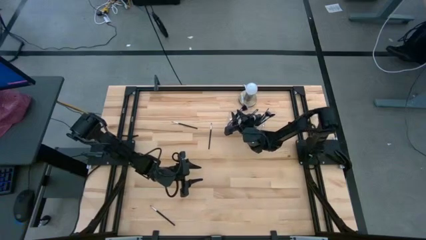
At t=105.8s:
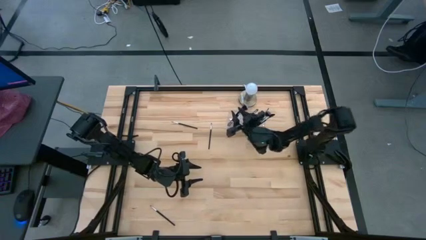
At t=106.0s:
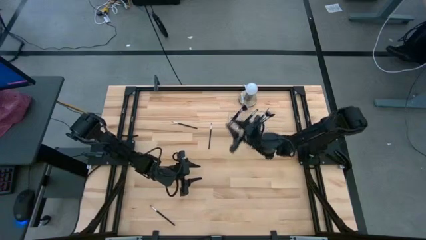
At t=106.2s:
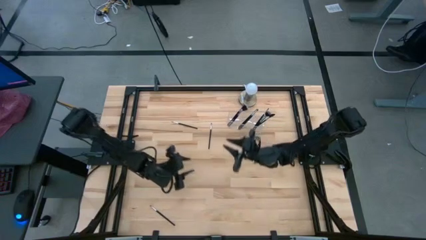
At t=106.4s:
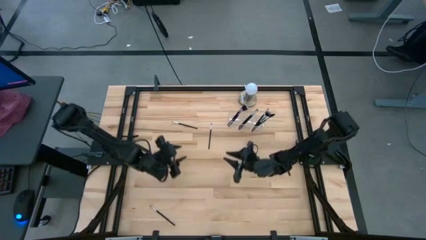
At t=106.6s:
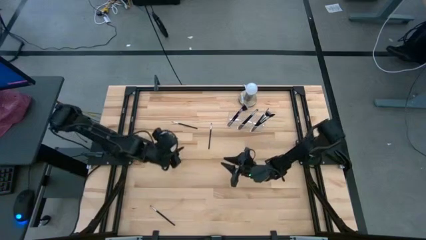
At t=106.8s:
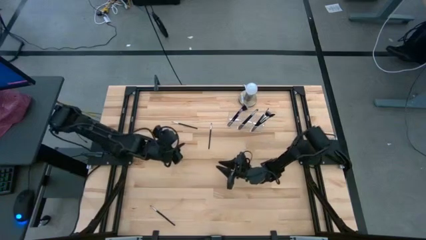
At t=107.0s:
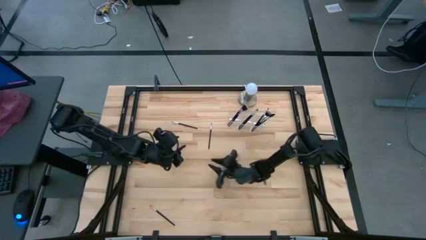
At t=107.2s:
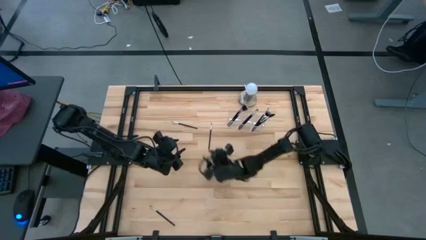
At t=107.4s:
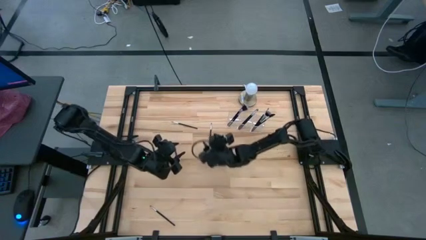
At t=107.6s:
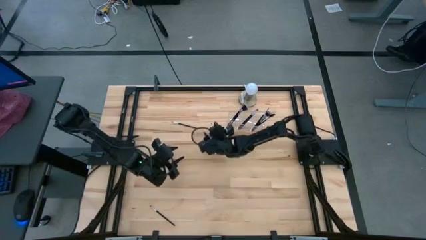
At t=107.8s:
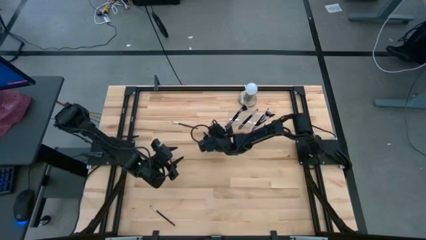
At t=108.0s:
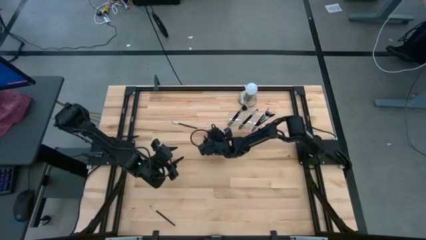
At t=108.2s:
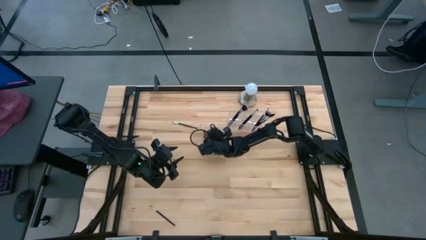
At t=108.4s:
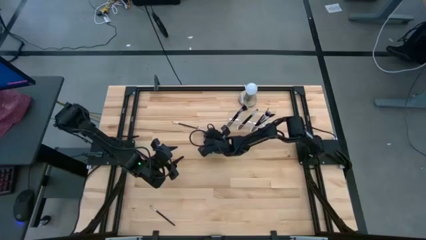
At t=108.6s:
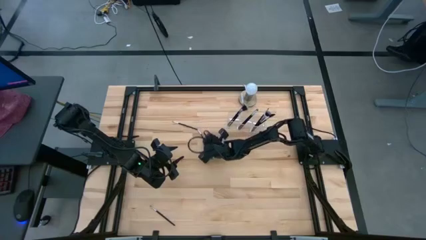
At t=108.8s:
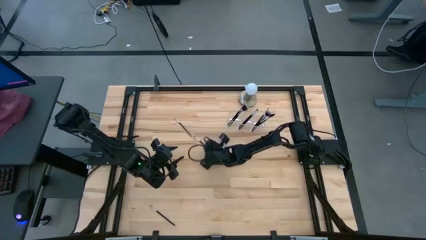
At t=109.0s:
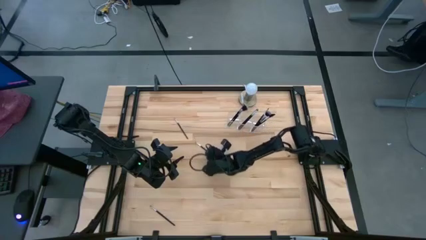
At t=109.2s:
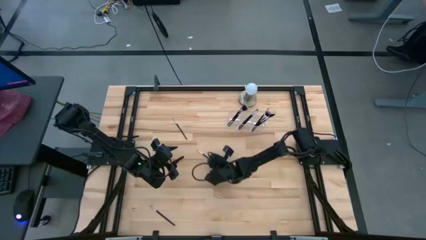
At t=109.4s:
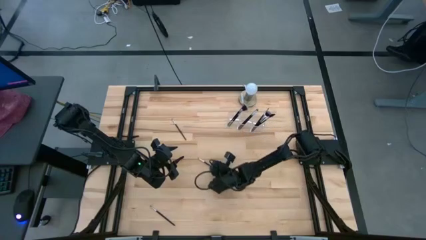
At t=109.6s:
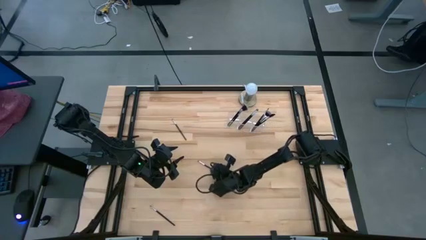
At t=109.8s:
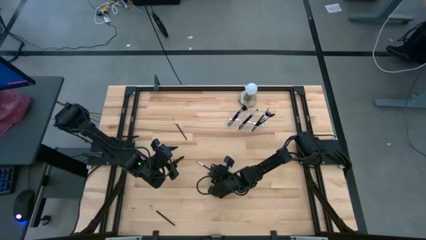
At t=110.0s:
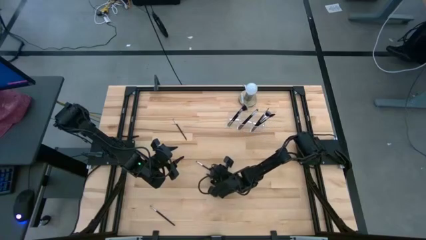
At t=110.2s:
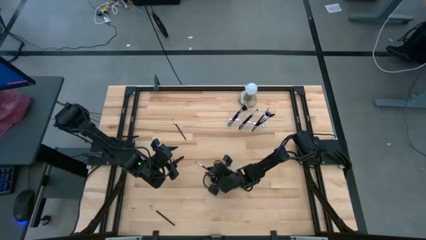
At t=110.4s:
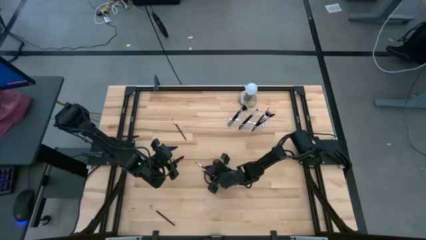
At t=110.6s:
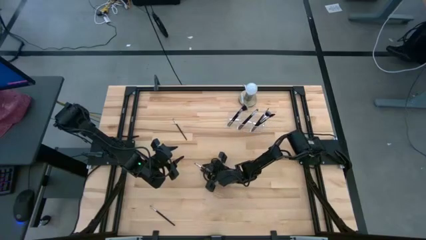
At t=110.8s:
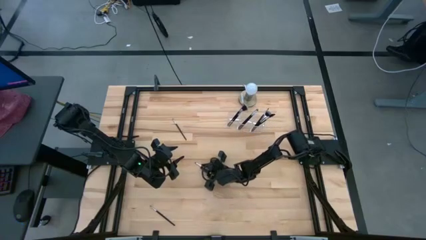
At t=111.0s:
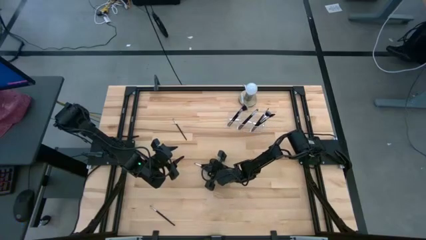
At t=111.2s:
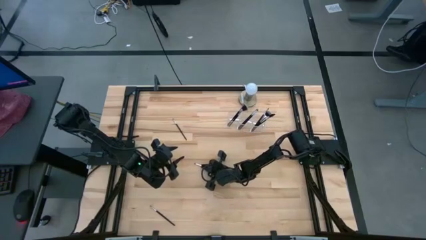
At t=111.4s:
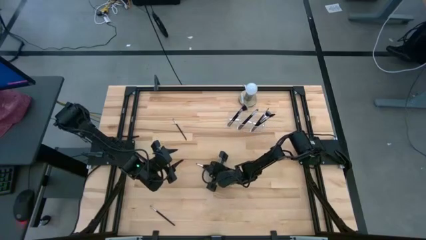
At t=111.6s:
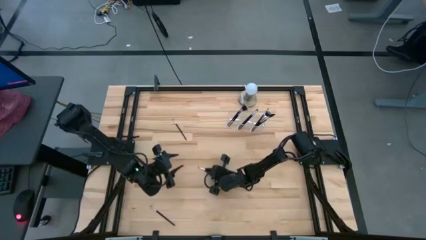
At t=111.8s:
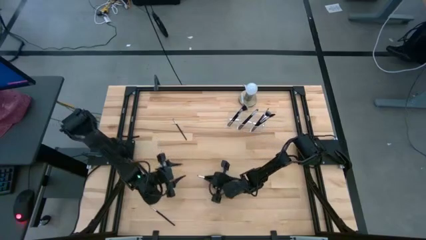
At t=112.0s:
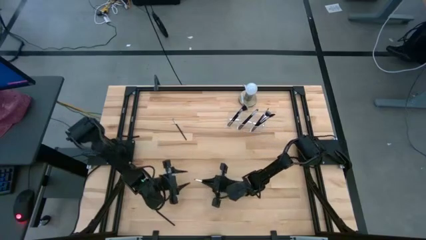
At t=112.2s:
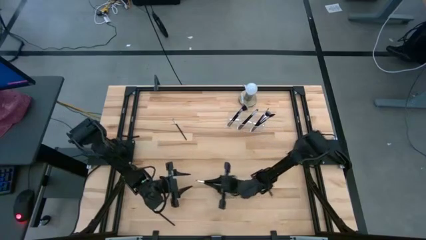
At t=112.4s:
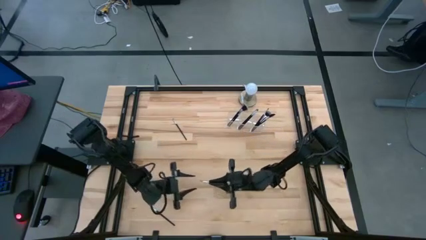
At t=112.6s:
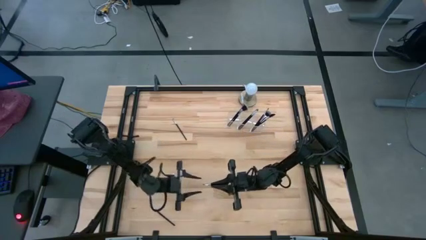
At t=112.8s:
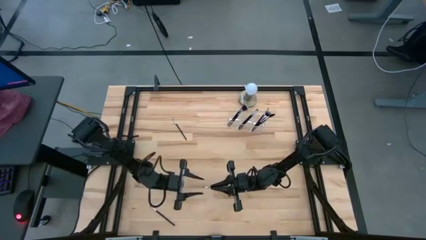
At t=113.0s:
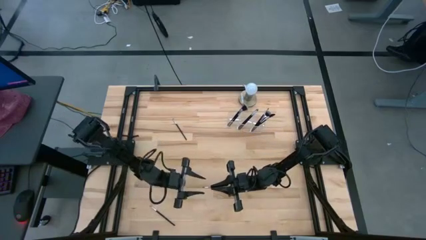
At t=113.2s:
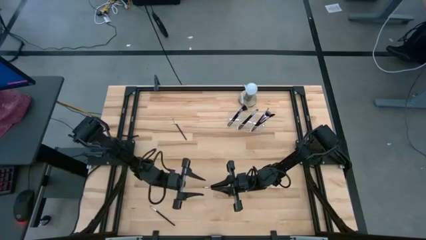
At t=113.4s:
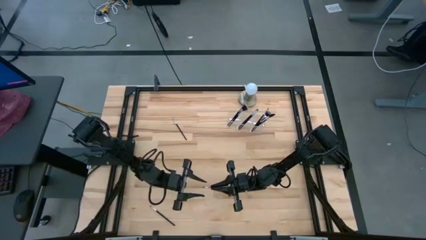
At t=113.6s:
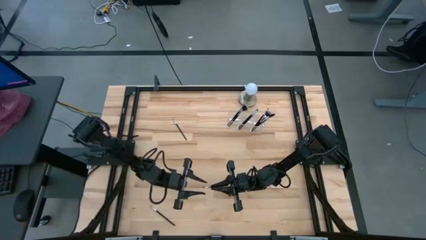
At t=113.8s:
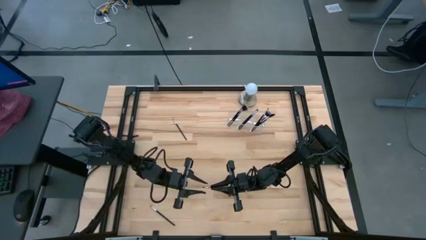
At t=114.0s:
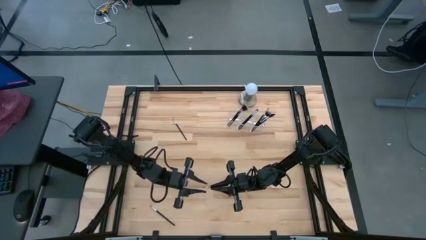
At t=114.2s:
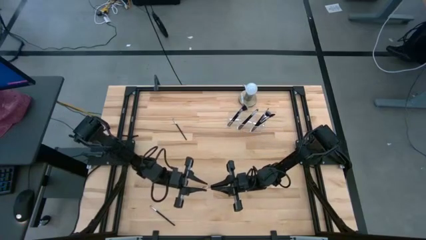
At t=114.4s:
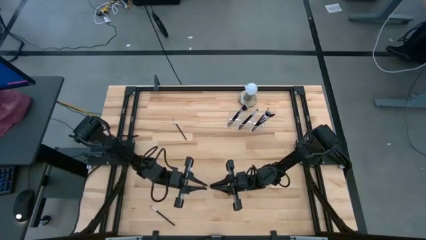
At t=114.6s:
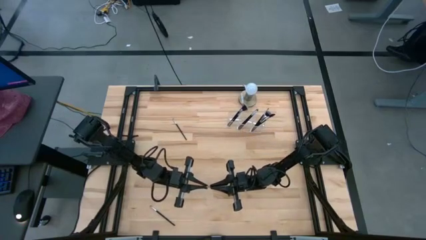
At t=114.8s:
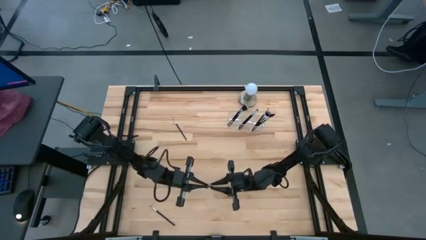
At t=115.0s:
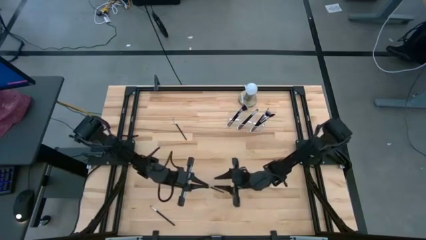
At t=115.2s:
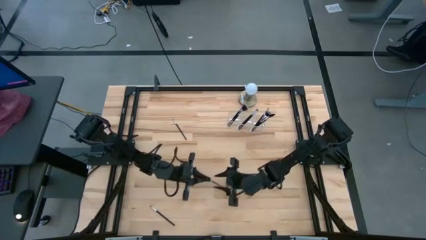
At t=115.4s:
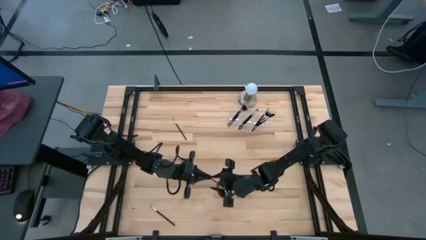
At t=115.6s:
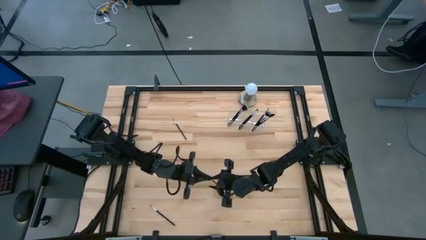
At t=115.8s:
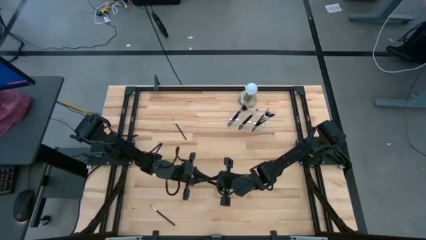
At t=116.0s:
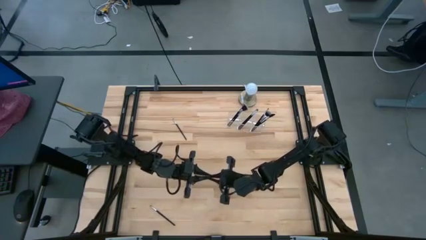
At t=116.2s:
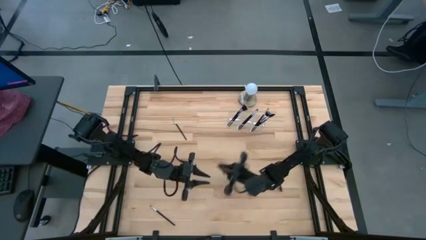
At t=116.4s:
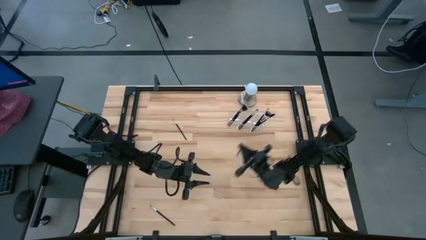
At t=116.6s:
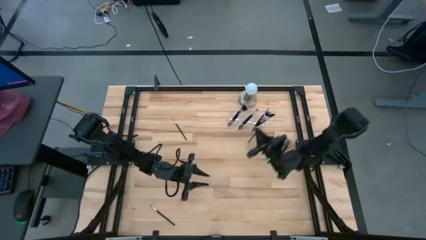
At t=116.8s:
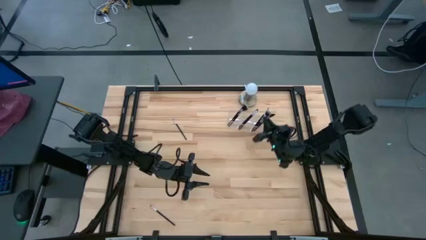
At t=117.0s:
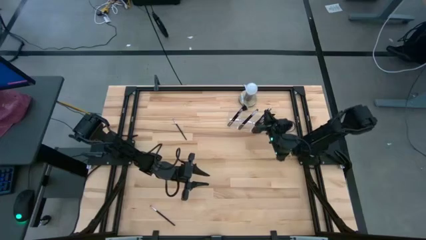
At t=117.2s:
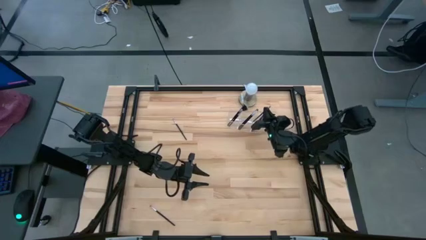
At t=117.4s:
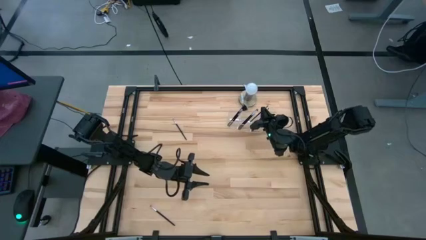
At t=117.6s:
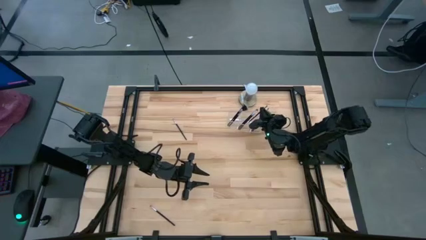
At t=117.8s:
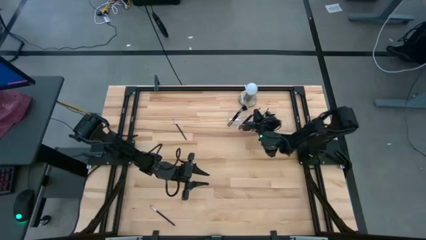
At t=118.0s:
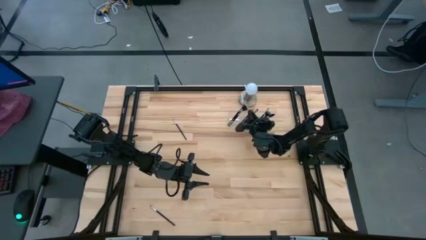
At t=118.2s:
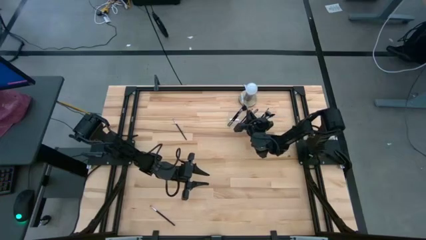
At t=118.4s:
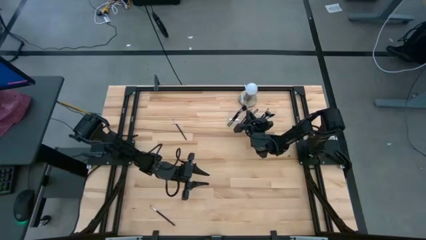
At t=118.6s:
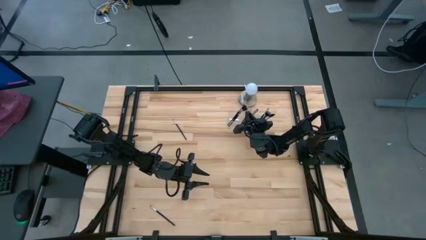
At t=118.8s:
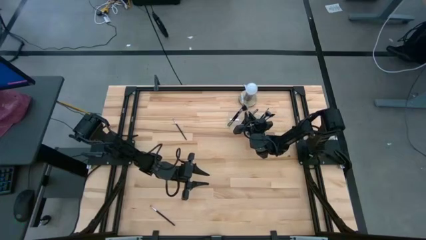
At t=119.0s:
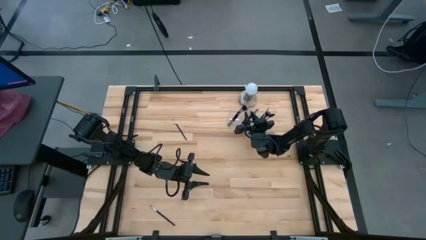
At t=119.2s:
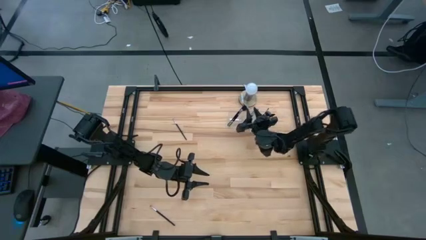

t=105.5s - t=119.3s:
Task: Put items in baskets/containers
Put the eyeshadow brush into the transparent organizer

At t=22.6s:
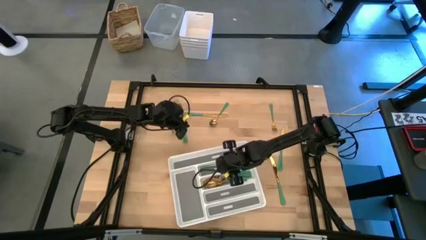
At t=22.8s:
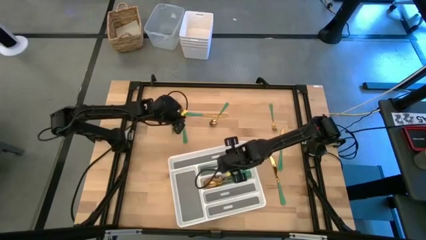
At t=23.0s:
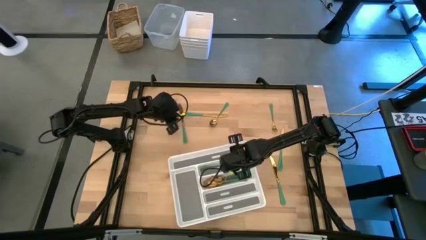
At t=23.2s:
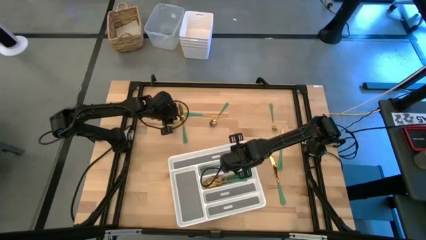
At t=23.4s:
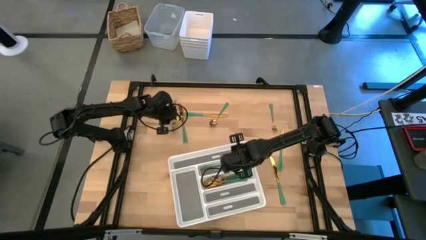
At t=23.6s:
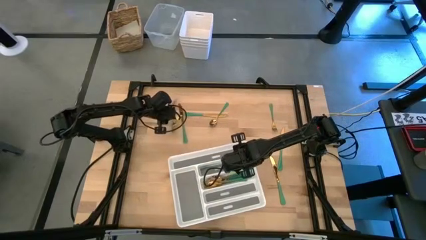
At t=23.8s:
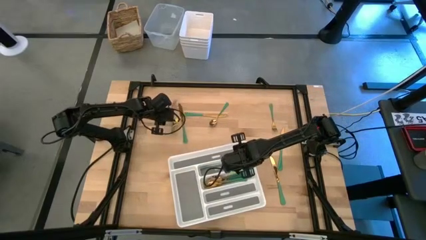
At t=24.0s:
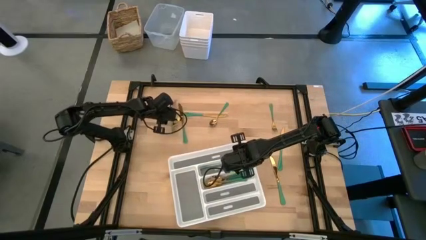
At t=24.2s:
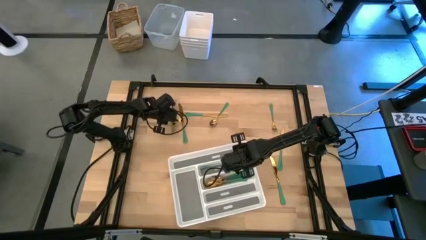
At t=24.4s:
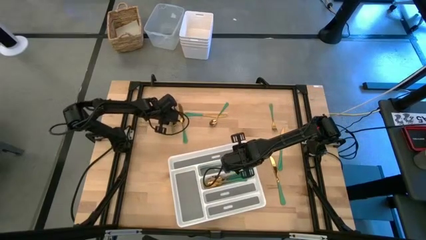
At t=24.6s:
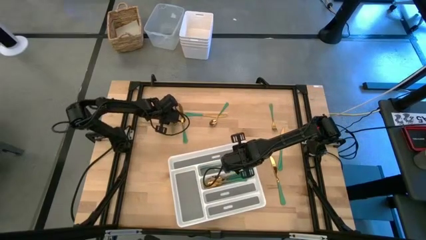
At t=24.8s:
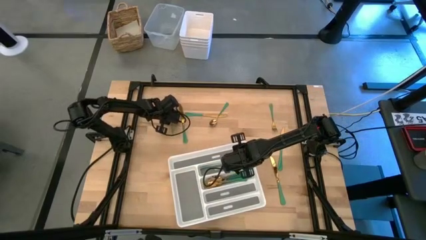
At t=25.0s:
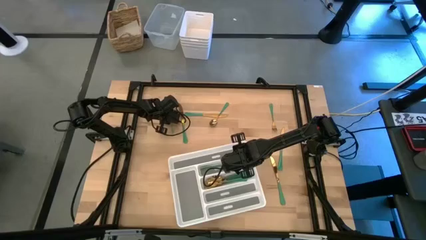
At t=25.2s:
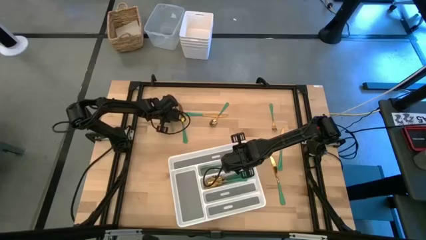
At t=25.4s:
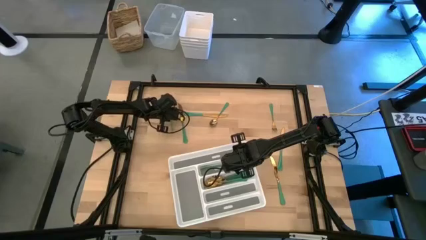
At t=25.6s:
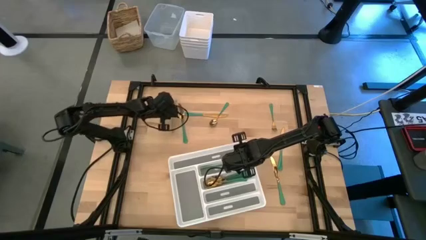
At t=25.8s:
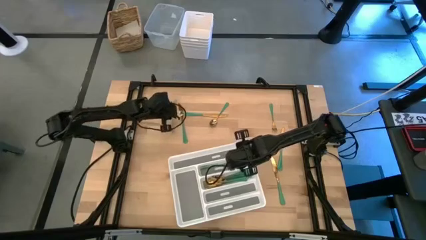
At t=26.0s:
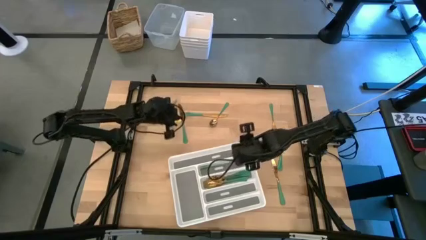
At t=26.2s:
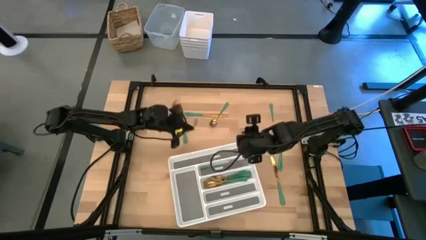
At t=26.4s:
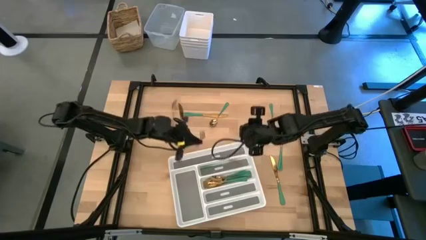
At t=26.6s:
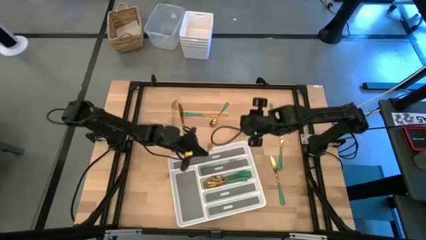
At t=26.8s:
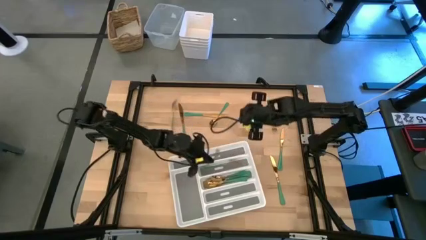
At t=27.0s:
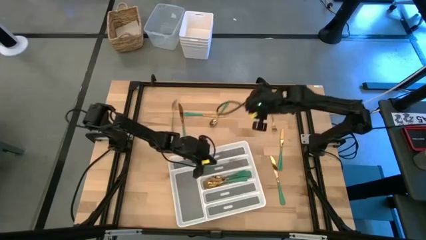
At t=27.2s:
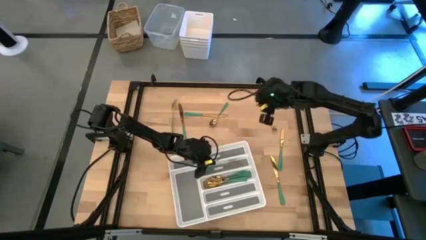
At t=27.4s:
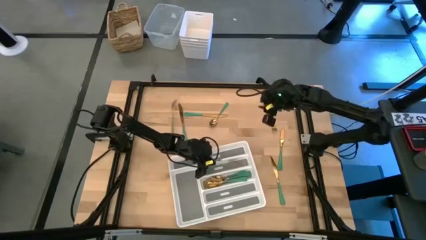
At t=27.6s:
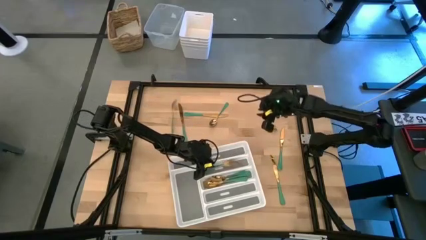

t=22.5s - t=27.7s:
Task: Sort silverware
Put the green fork into the white silverware tray
